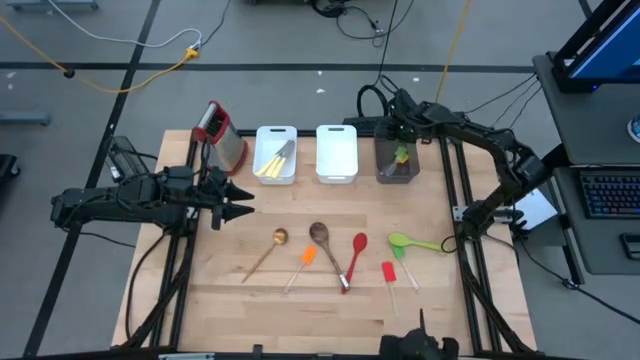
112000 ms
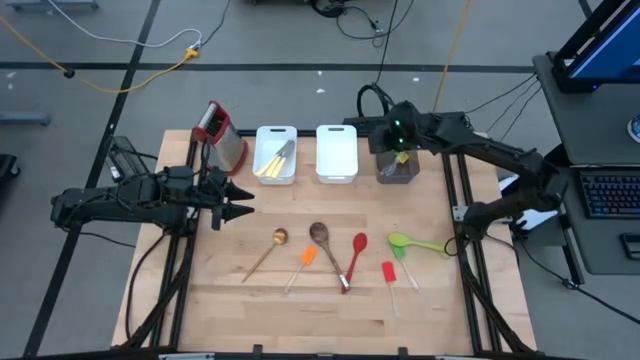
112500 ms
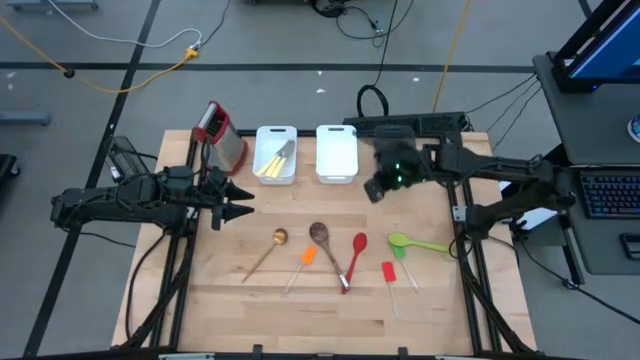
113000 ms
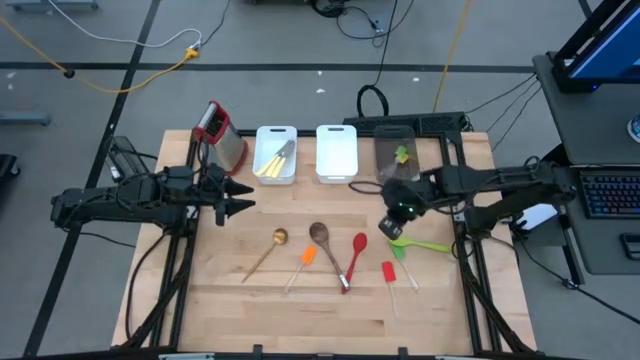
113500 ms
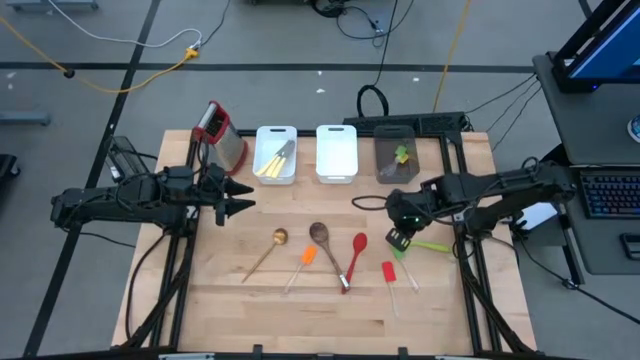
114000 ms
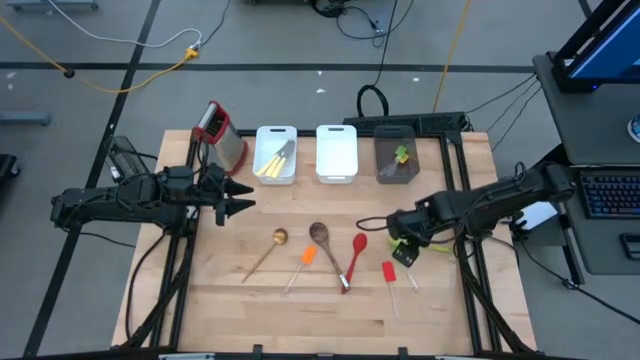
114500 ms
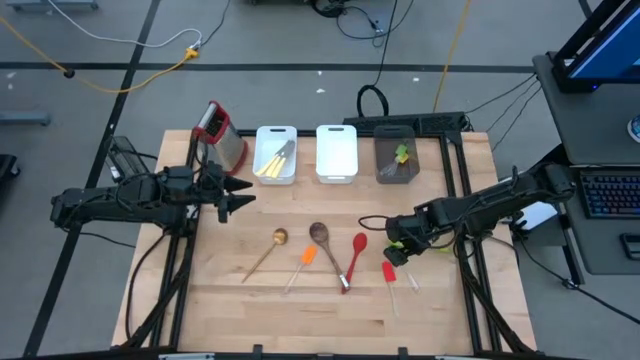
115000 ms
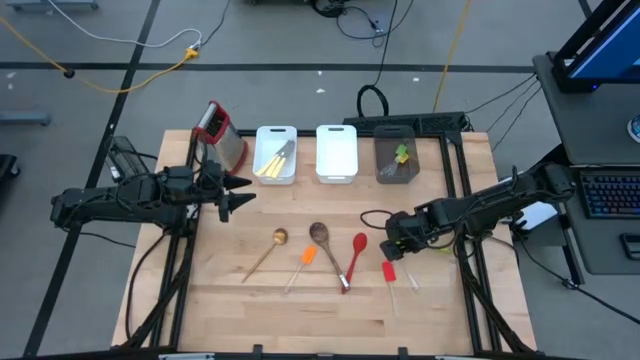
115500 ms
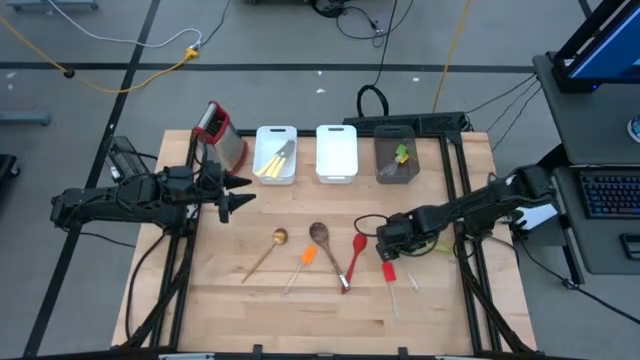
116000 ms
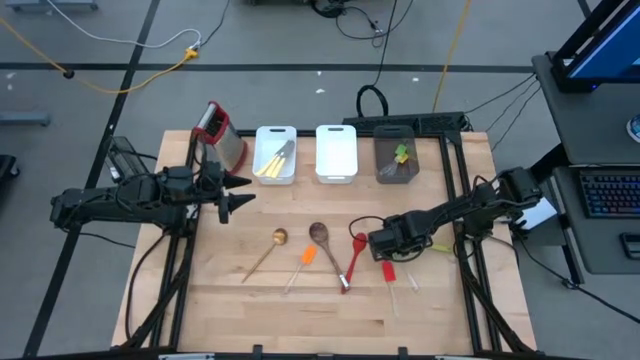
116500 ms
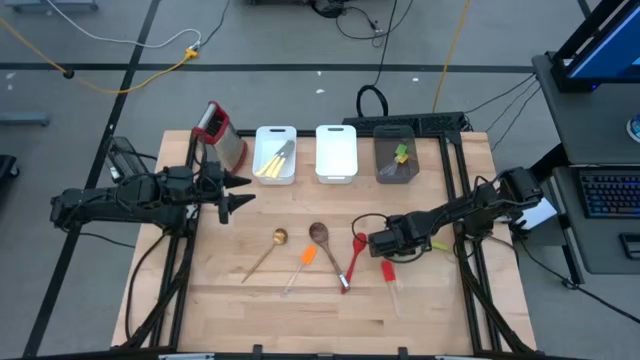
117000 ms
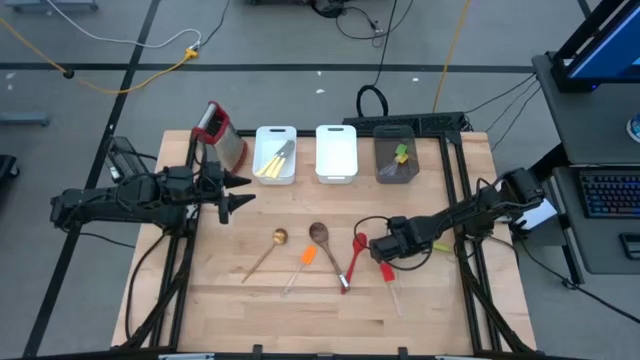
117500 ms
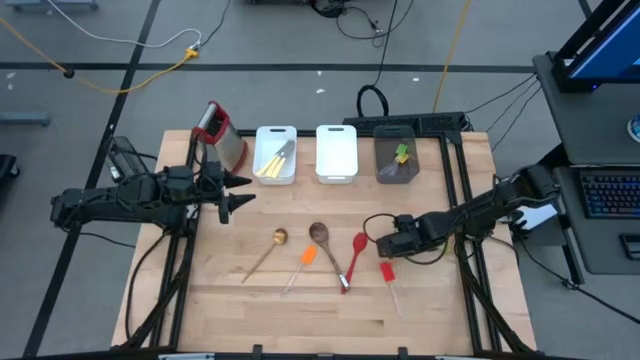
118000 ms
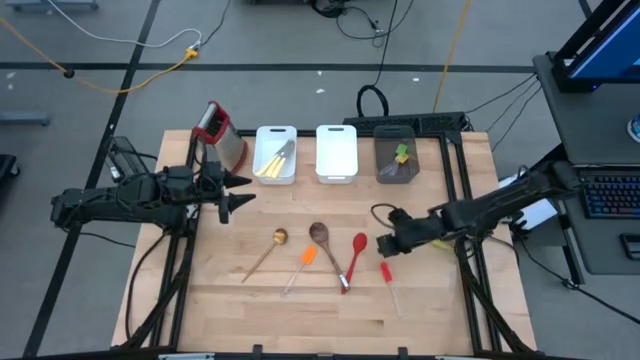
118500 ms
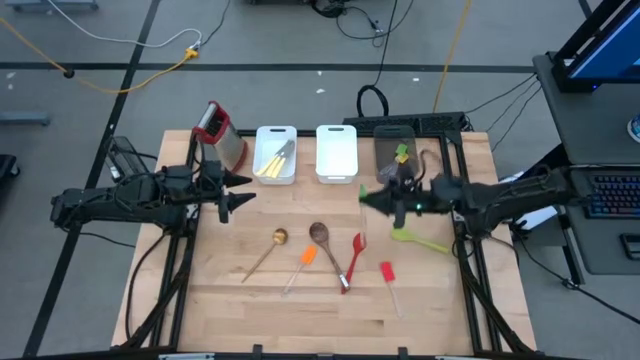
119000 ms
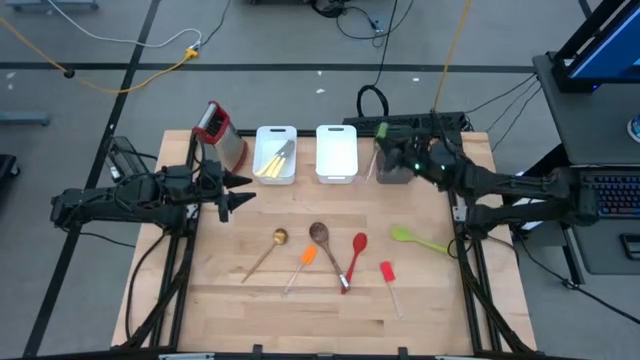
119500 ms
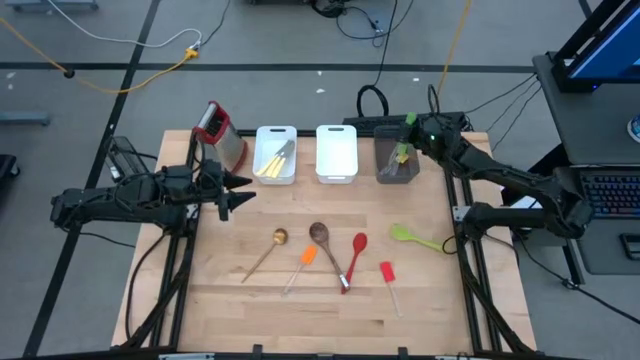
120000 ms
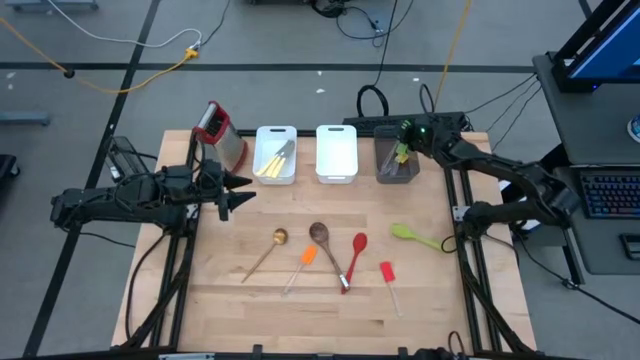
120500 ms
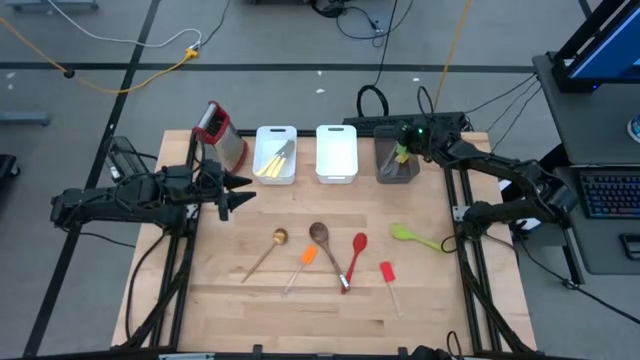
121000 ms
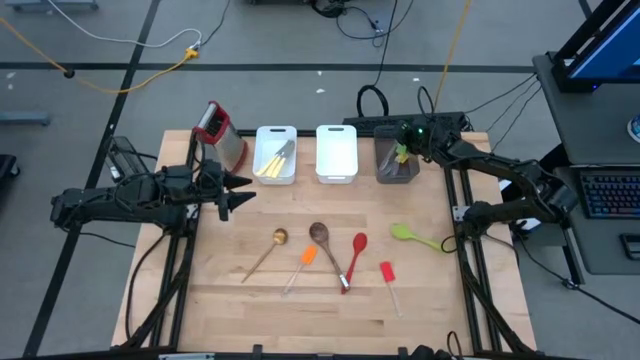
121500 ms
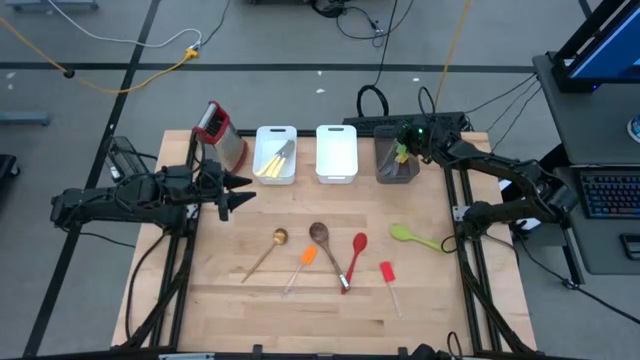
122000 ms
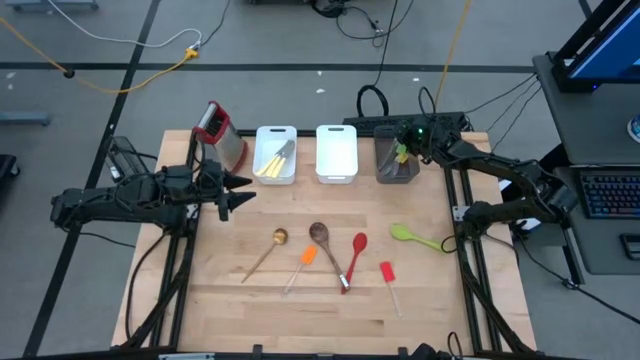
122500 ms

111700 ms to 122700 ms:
Task: Pick & Place Kitchen Items
Put the green spatula into the black bin

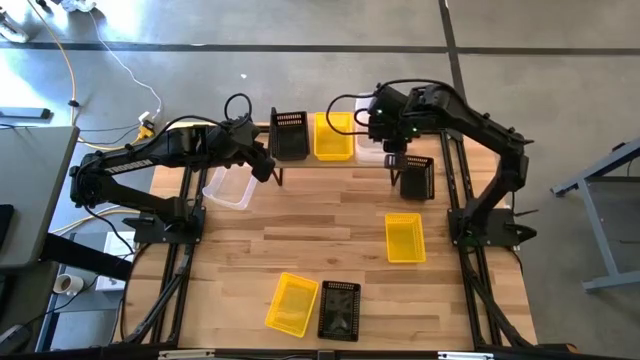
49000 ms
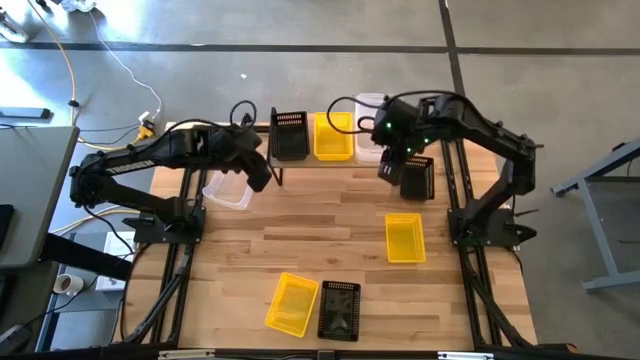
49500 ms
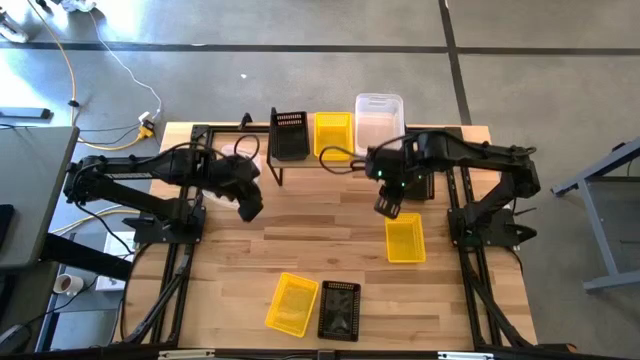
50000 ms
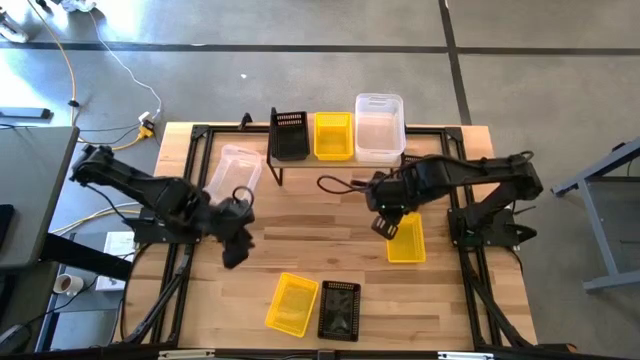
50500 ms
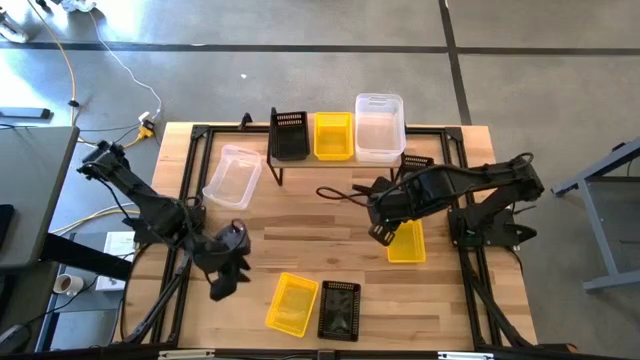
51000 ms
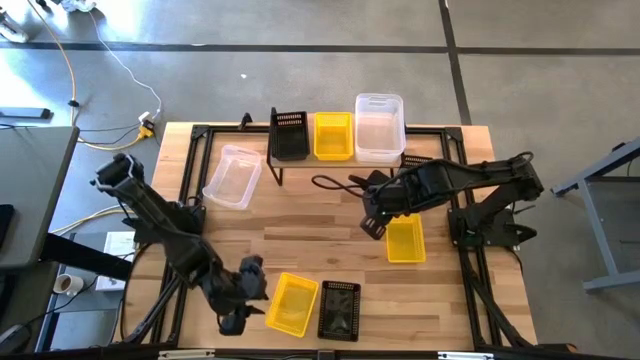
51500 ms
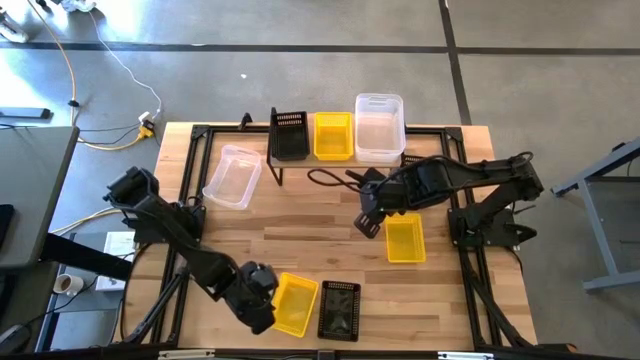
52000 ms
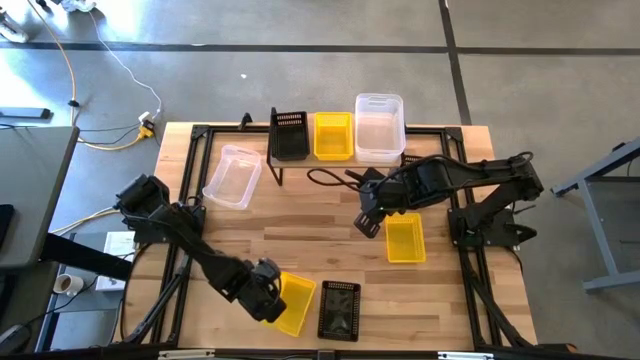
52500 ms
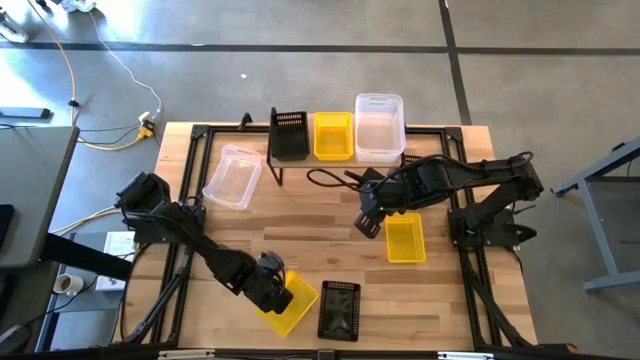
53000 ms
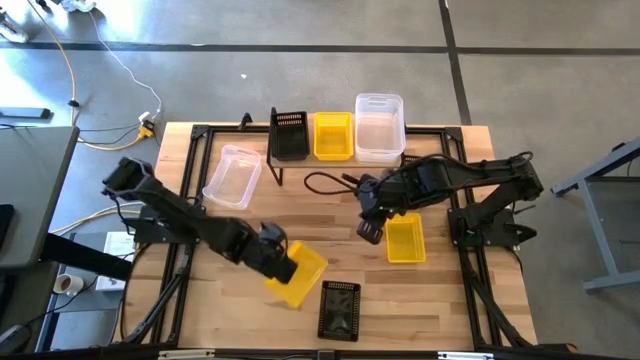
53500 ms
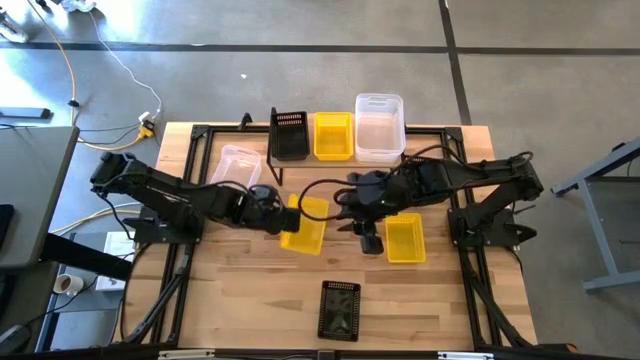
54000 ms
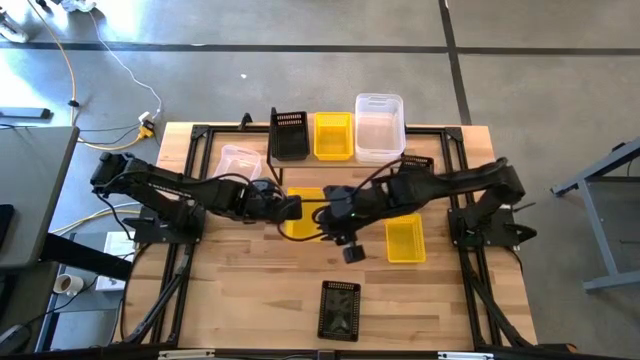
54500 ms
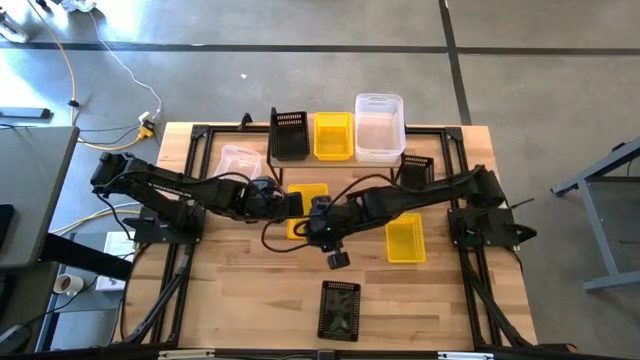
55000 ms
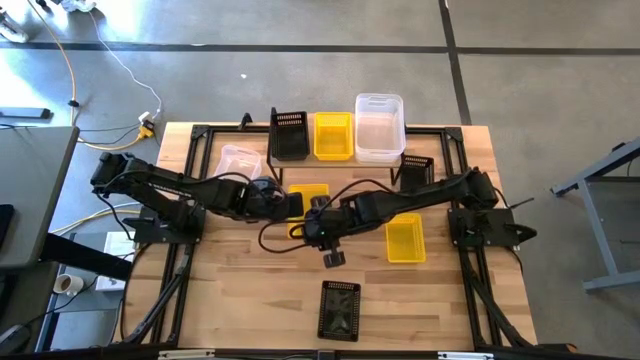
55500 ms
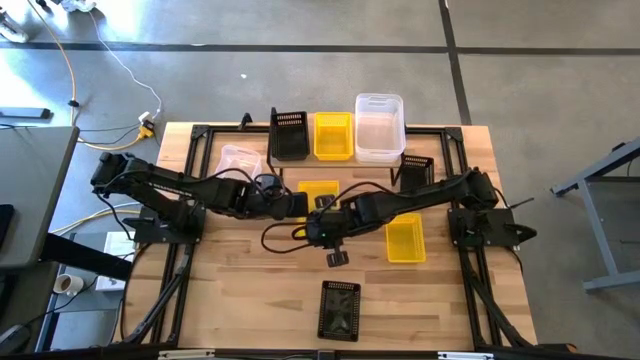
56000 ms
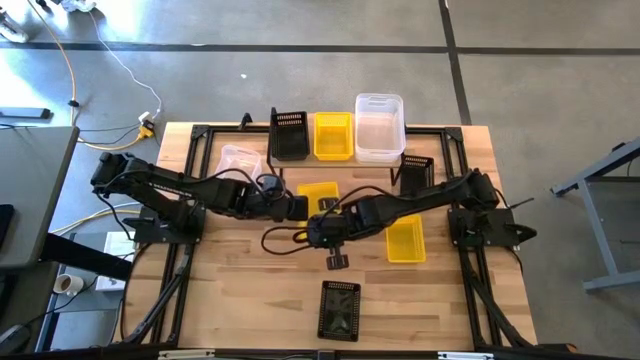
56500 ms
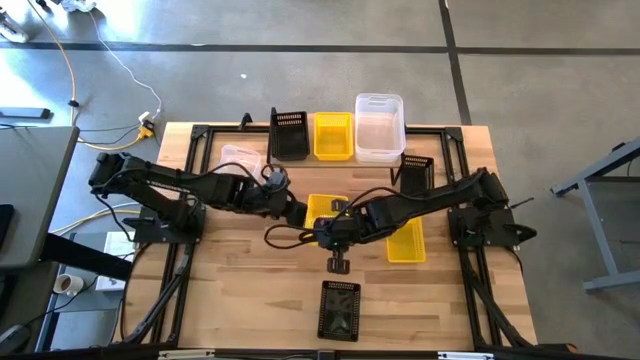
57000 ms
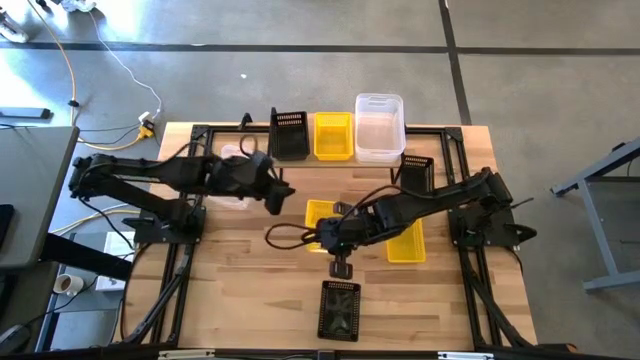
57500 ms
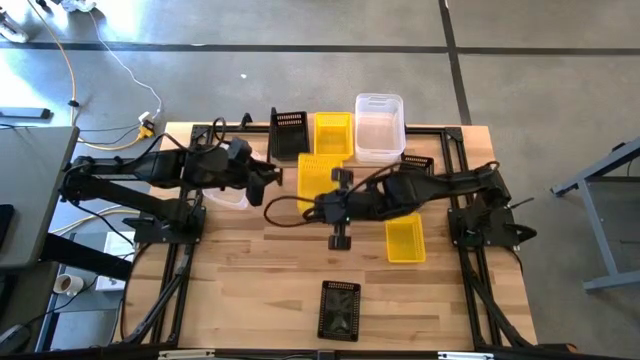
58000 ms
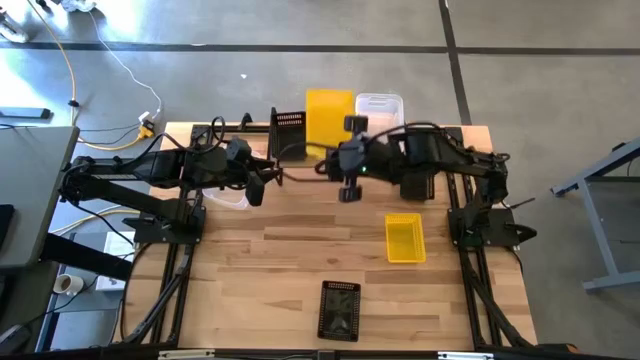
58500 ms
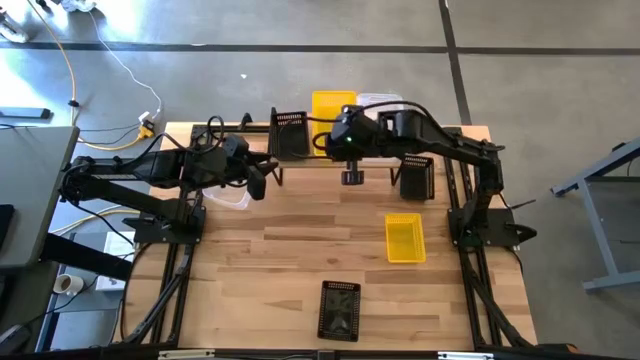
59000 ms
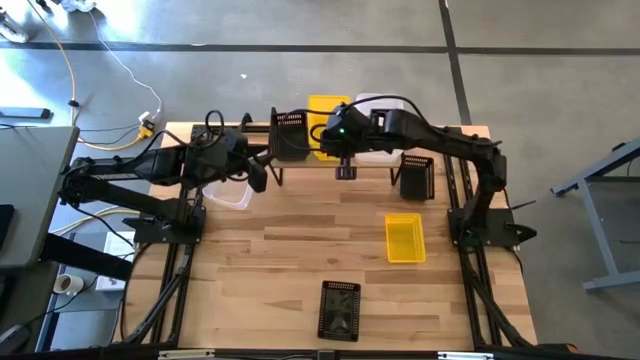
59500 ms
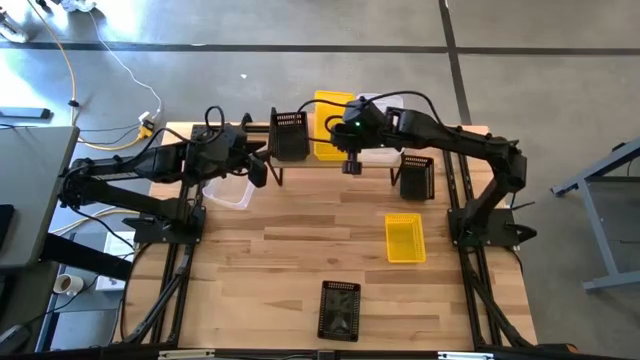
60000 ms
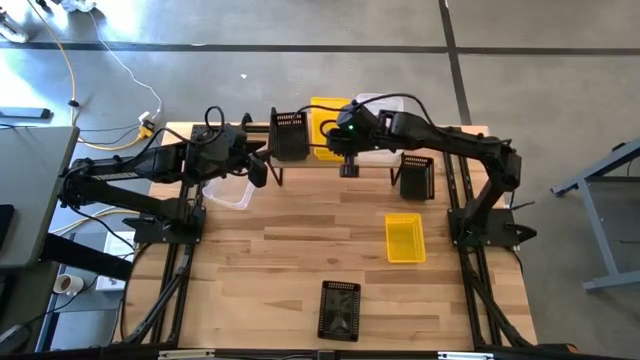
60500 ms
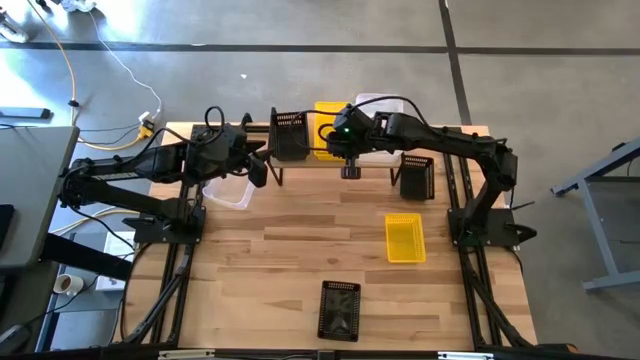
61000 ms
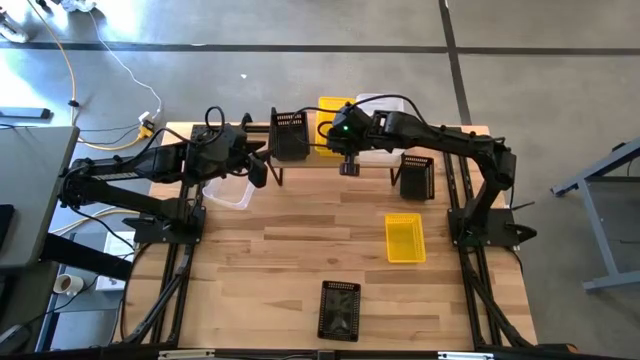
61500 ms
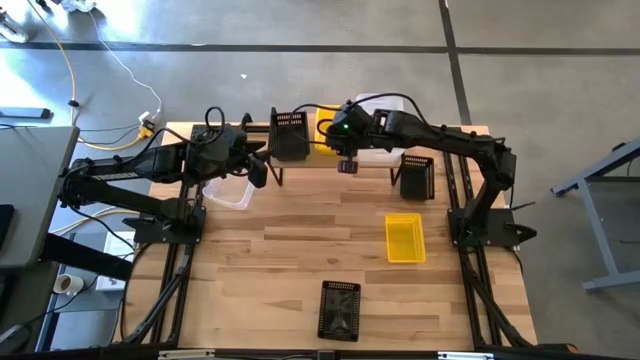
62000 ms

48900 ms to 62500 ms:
Task: Stack baskets on shelf by color
Stack the bottom yellow basket on top of the yellow basket on the shelf
